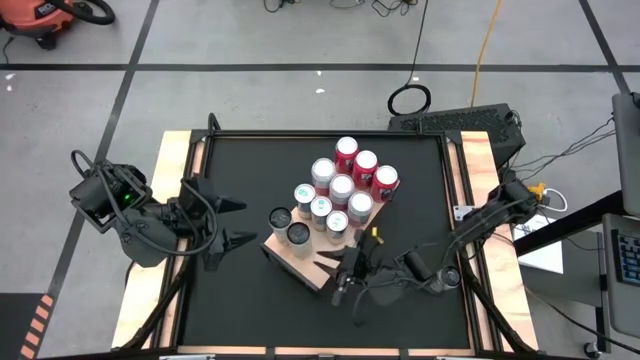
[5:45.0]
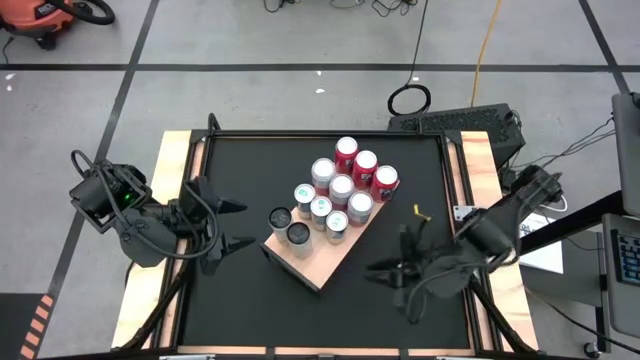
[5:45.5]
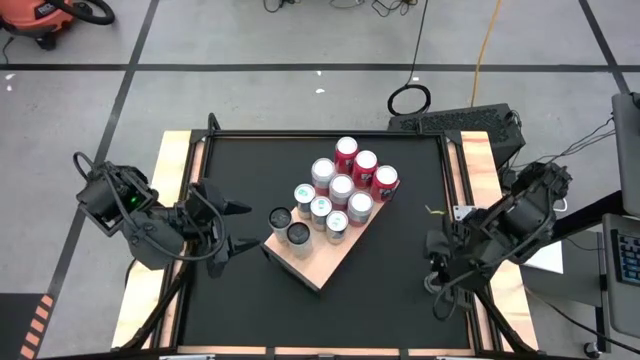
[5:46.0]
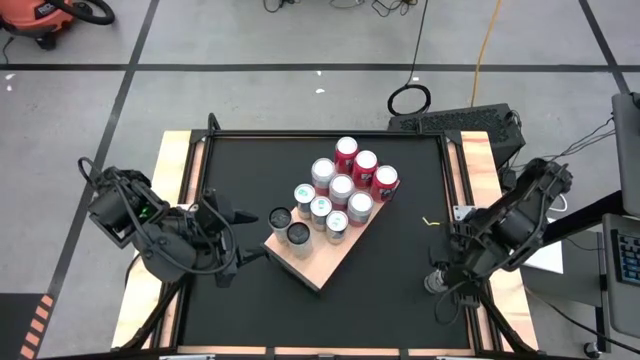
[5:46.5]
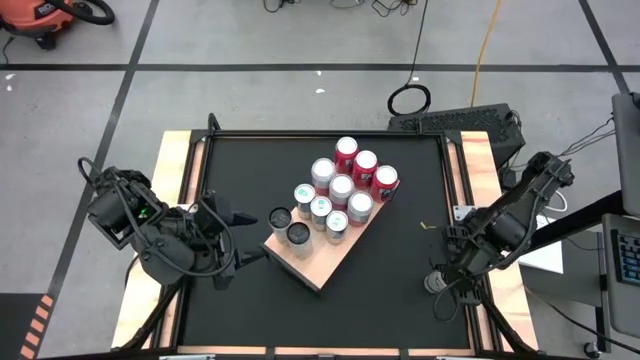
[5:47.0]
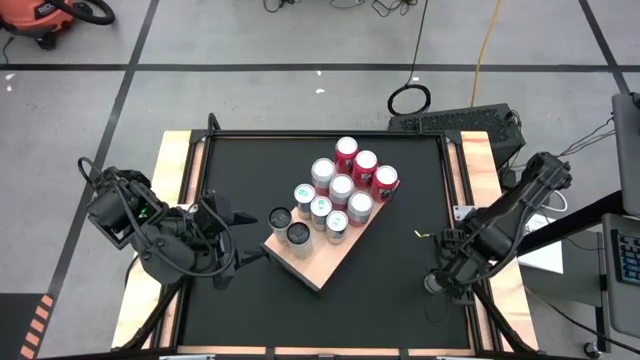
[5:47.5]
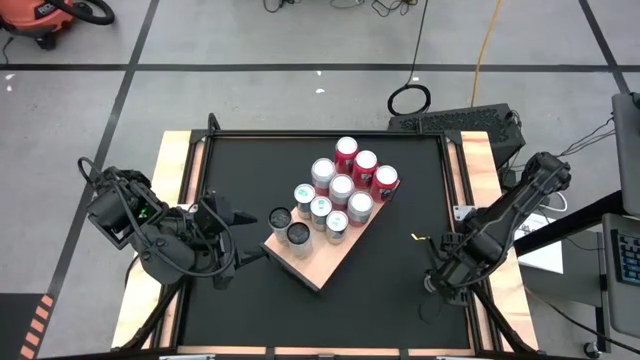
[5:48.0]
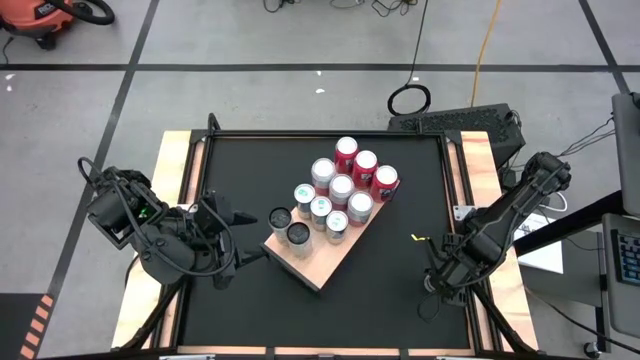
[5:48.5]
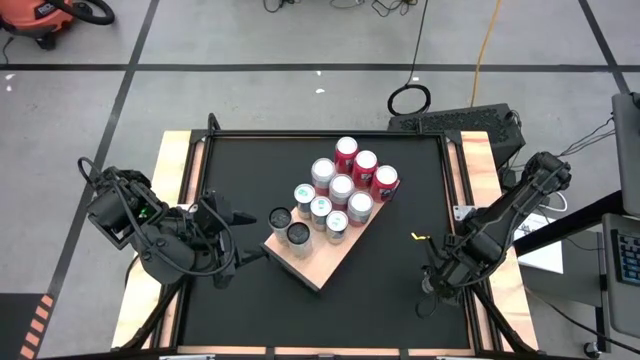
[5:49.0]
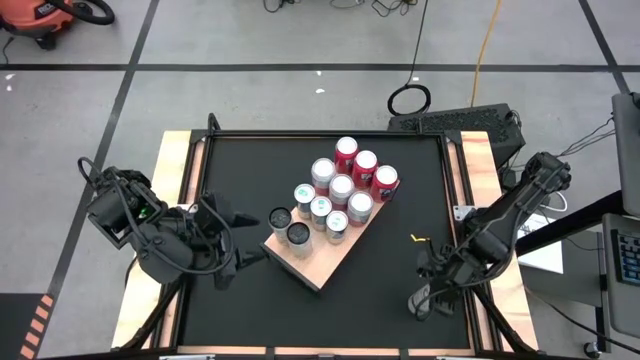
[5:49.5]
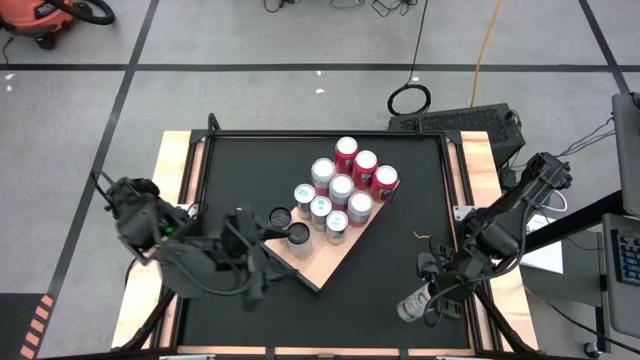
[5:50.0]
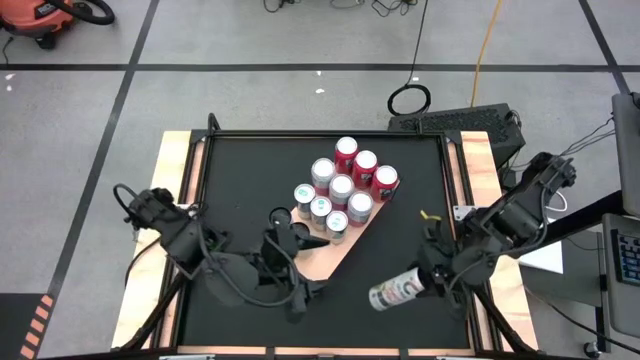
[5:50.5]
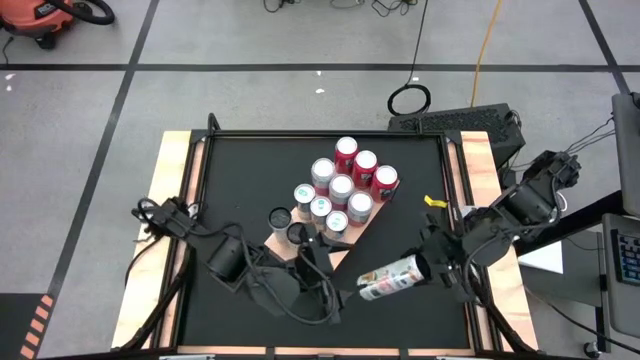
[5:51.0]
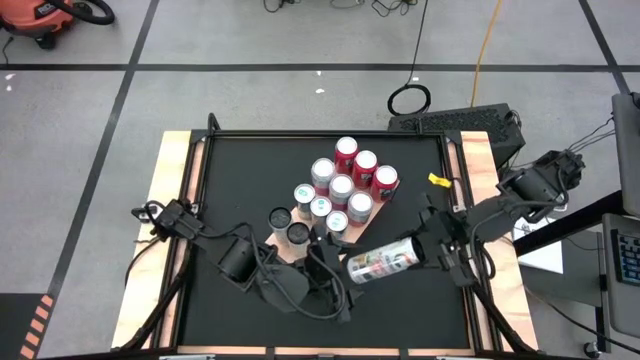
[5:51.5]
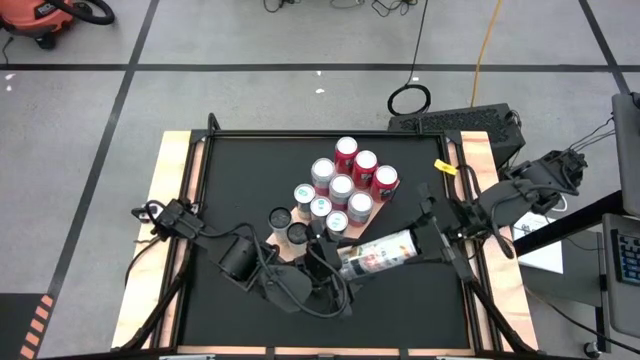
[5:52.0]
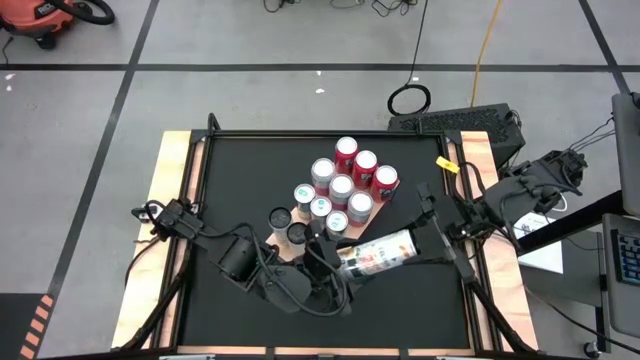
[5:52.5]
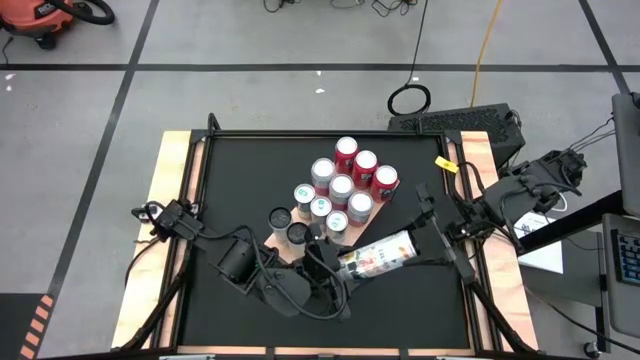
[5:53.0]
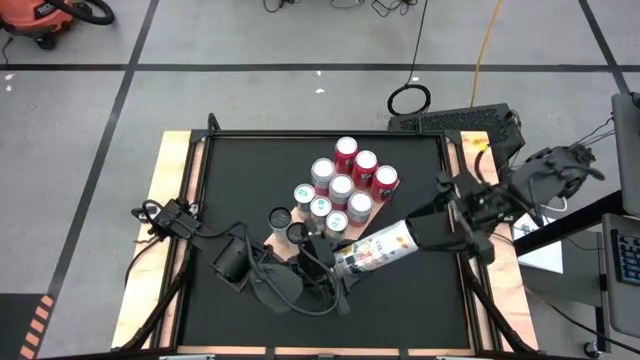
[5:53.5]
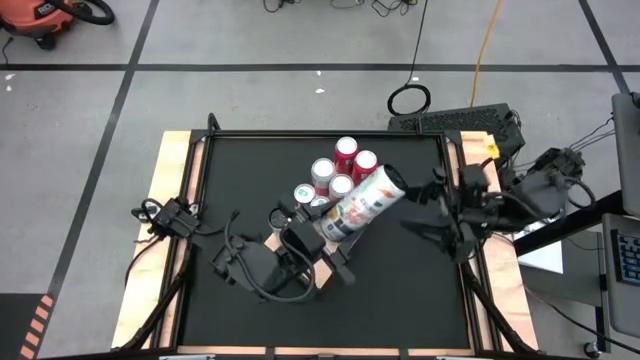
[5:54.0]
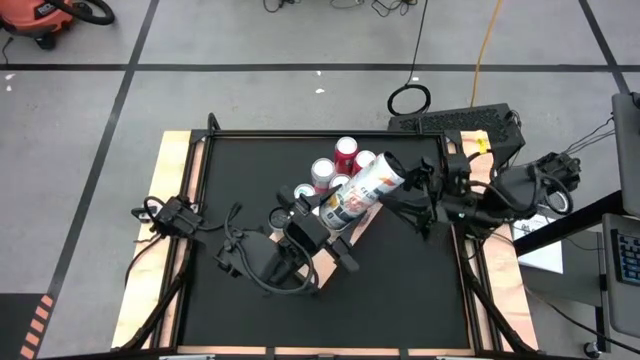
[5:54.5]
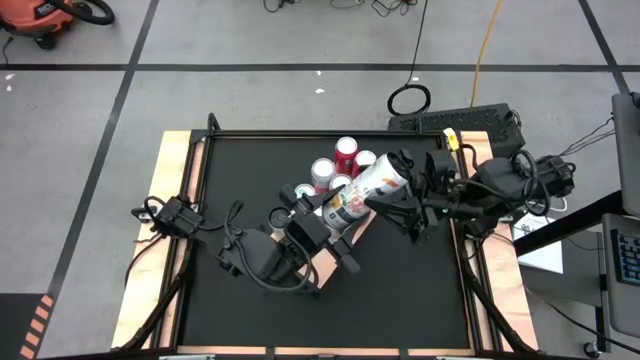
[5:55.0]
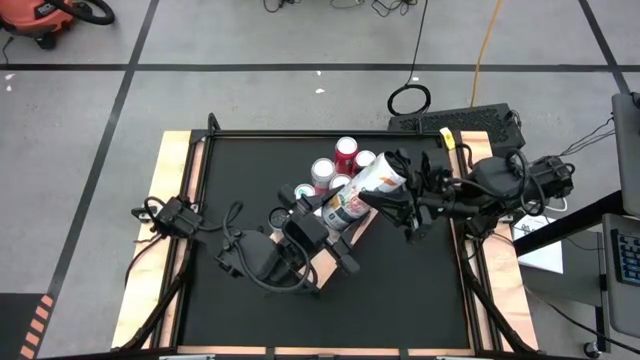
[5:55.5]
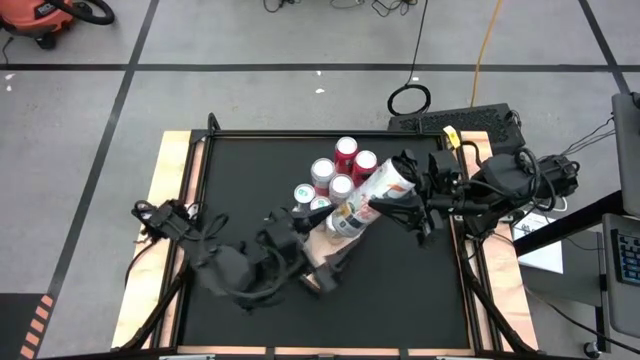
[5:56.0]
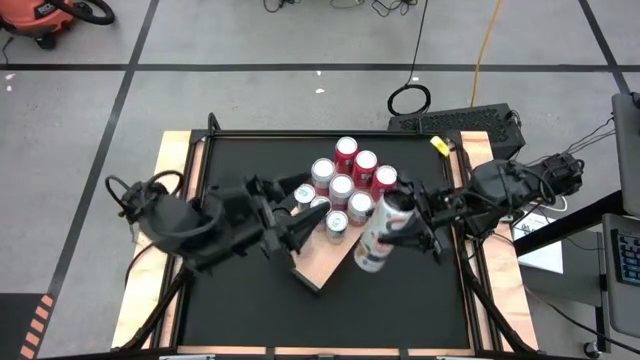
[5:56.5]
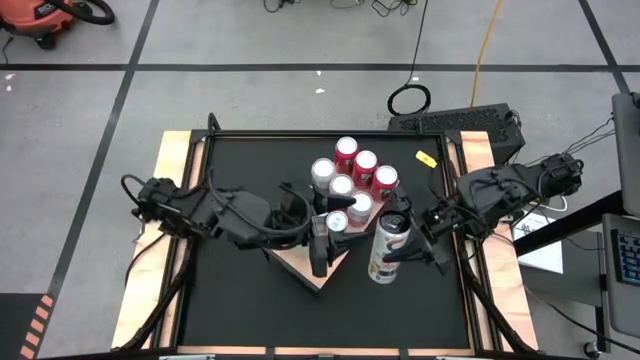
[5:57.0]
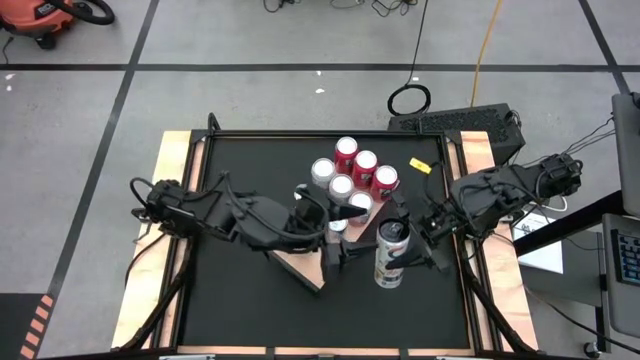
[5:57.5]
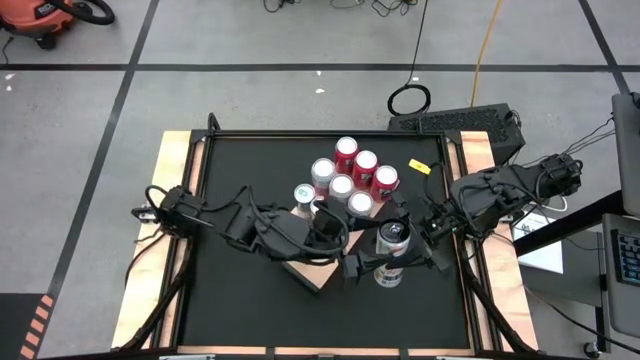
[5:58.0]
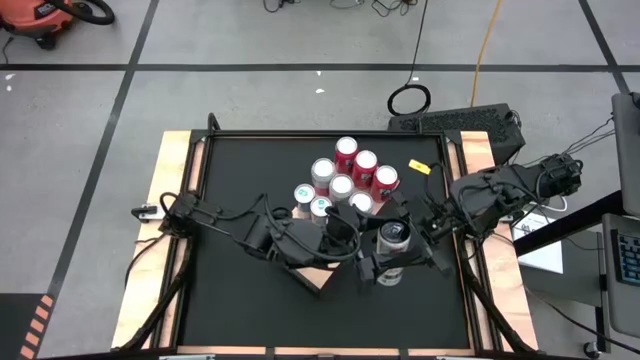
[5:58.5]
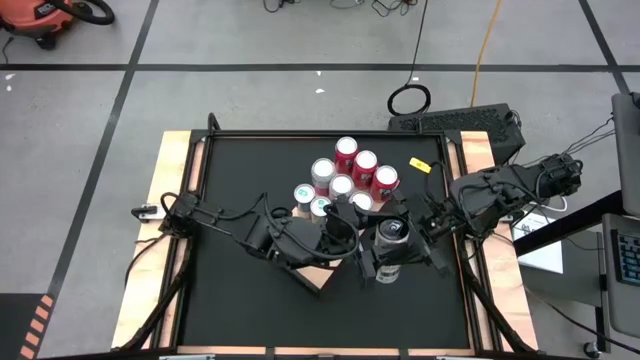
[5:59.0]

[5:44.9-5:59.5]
Task: Place canned beverage on shelf
Put the white-yellow soda can on the shelf aligned with the white-yellow soda can

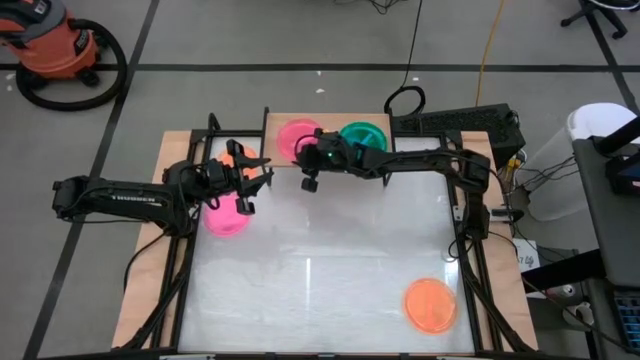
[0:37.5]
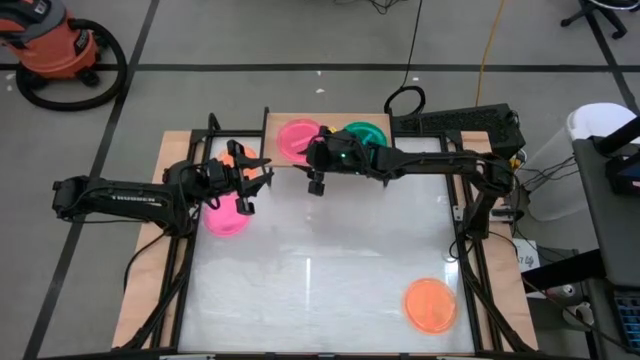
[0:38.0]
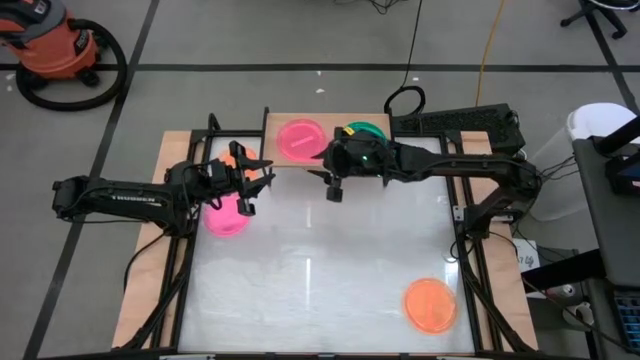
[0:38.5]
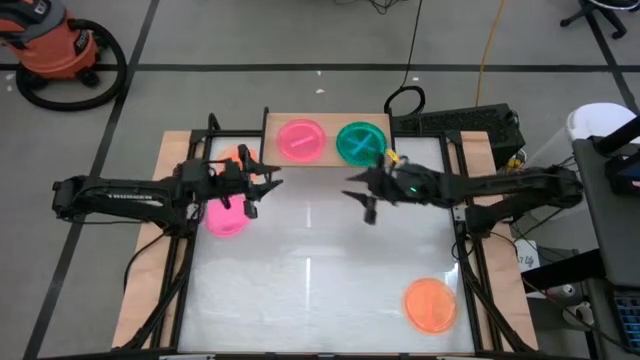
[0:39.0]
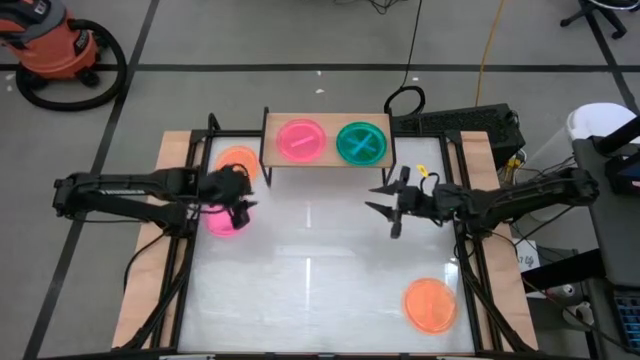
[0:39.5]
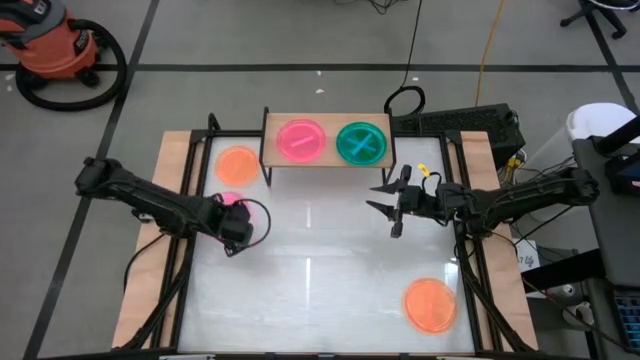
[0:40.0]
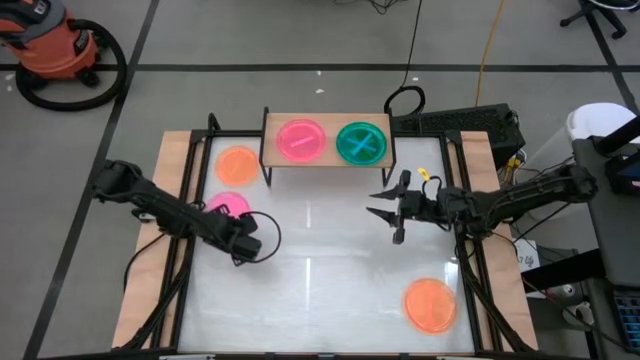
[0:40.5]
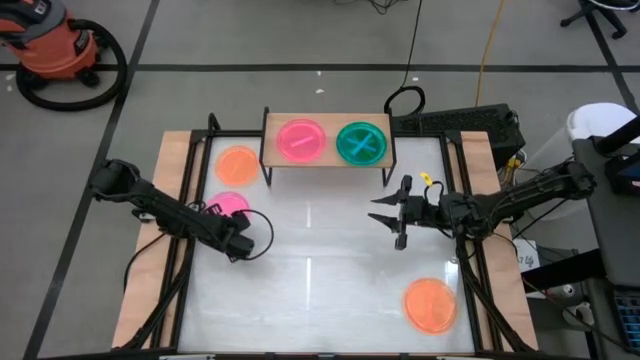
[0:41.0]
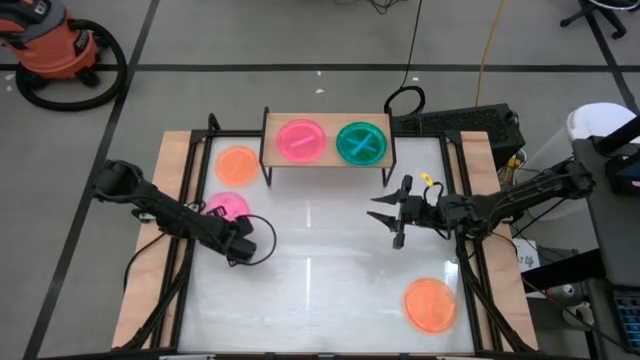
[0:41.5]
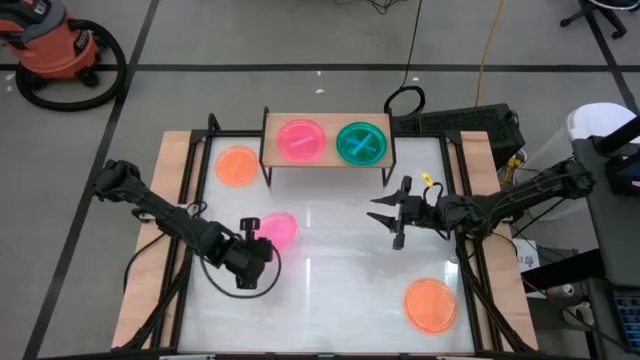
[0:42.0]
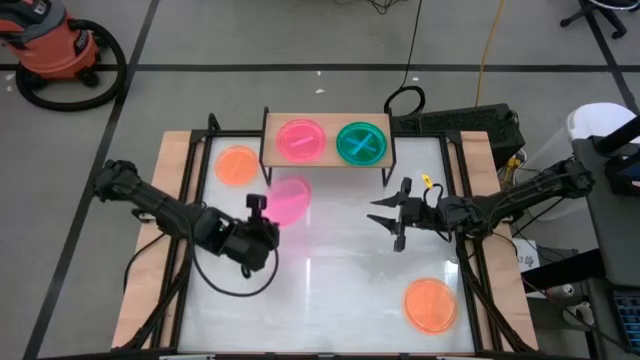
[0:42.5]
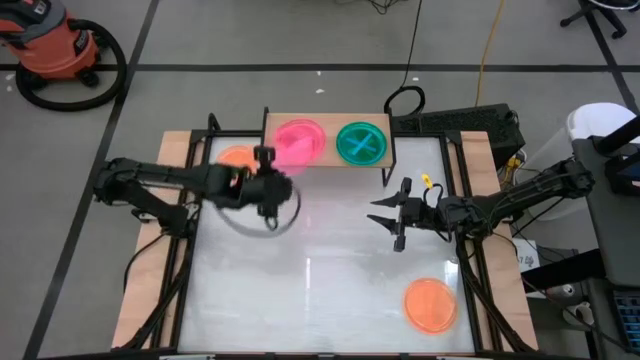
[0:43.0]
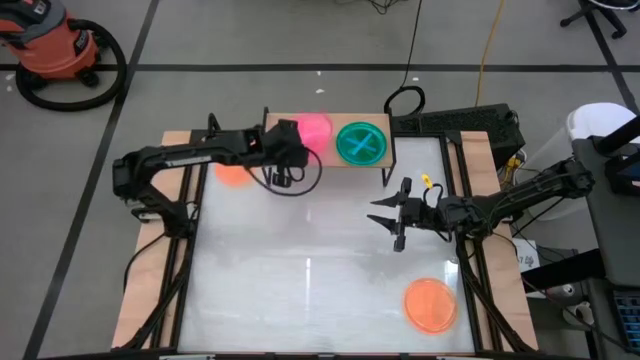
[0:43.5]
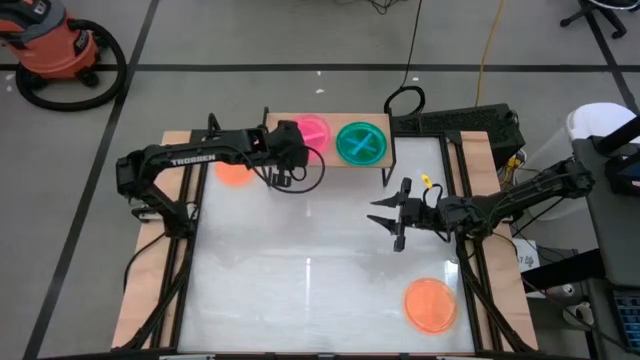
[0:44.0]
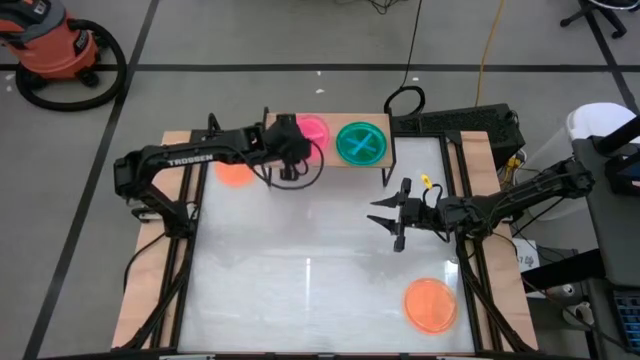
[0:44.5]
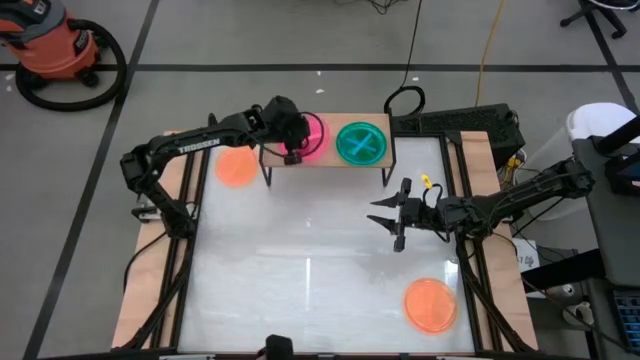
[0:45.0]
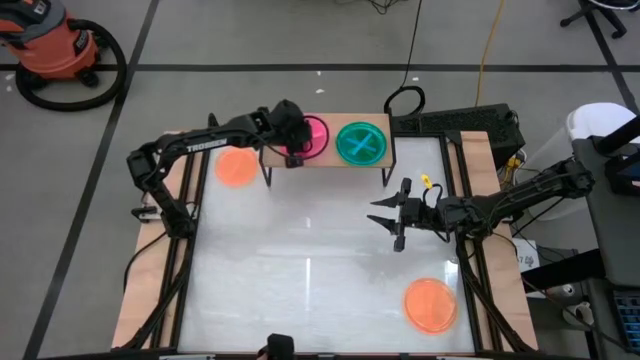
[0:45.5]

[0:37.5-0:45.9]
Task: Place and stack plates onto a shelf
Stack the pink plate on top of the pink plate on the shelf
